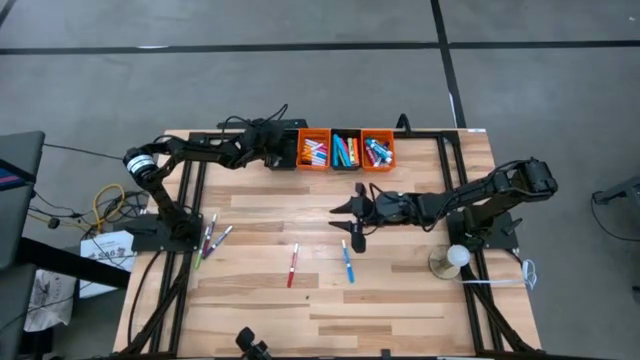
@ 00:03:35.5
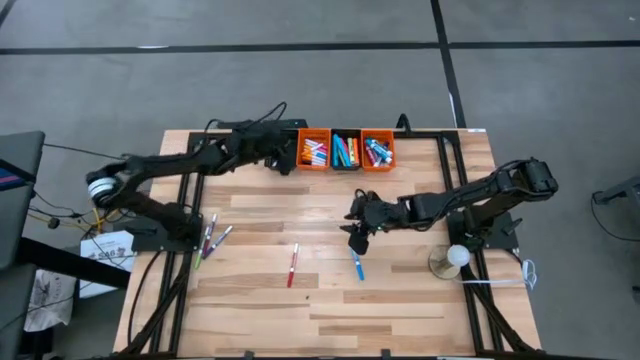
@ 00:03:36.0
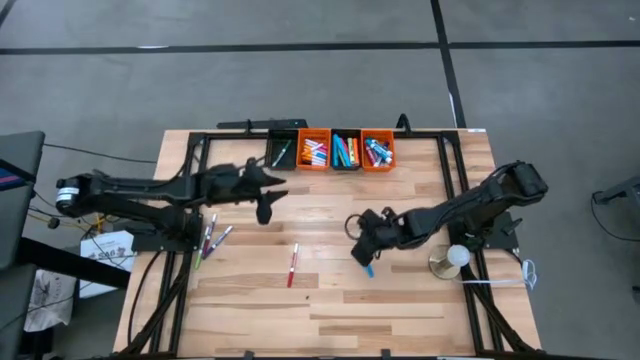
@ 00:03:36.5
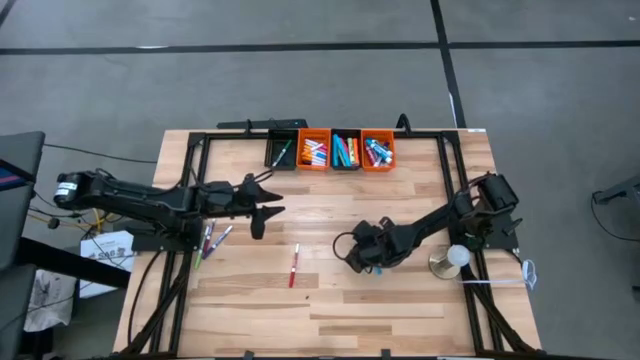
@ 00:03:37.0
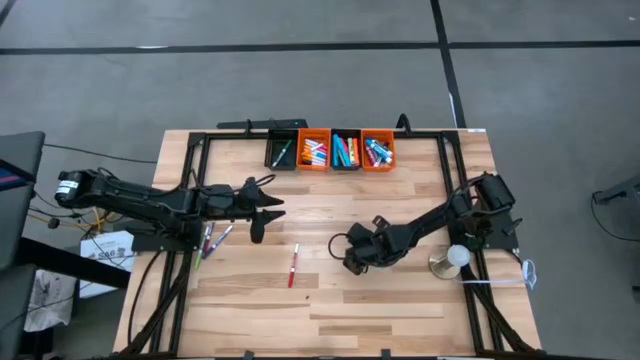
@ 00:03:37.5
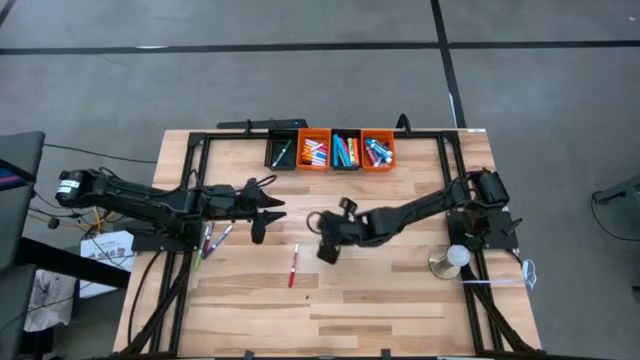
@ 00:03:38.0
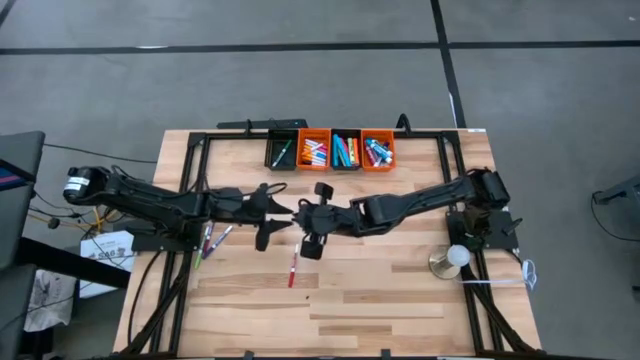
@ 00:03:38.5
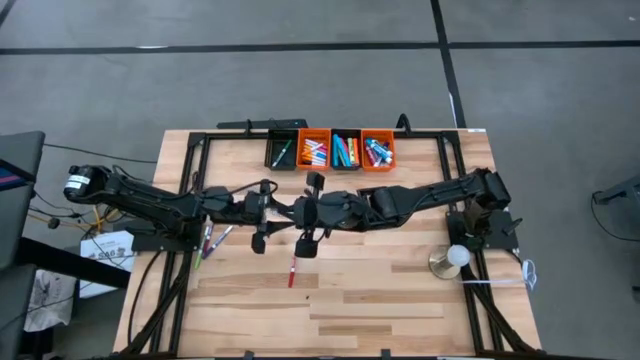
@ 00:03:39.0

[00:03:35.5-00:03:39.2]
Task: Pick & Place Markers
Put the light blue and white marker pen into the left black bin

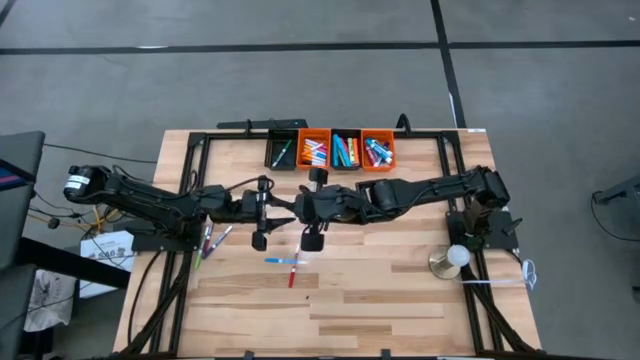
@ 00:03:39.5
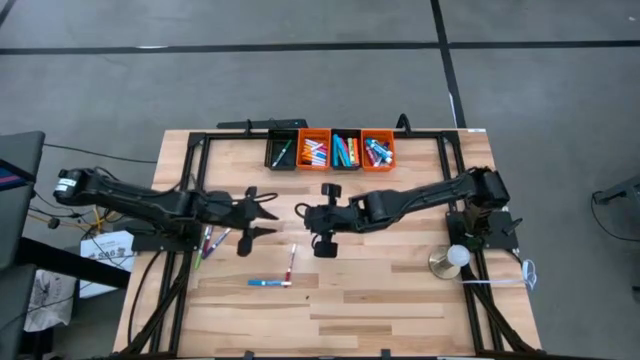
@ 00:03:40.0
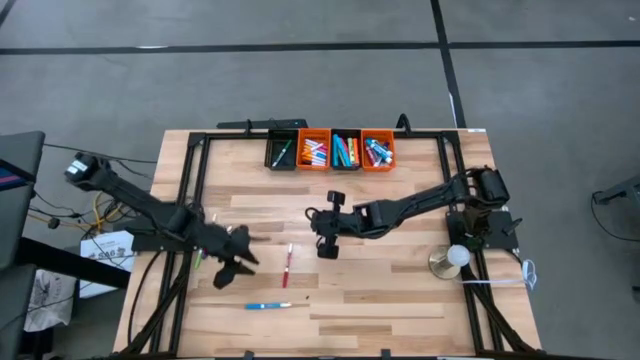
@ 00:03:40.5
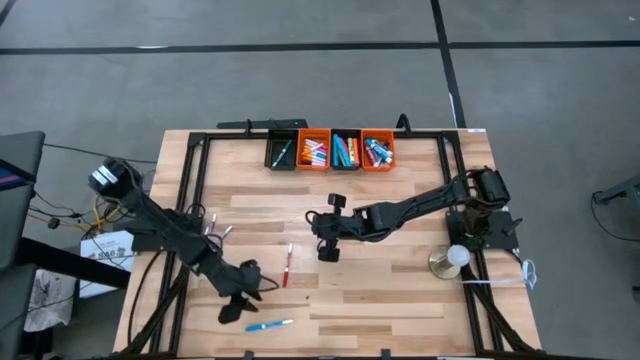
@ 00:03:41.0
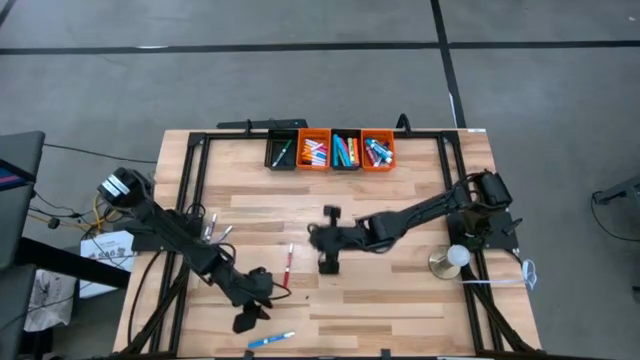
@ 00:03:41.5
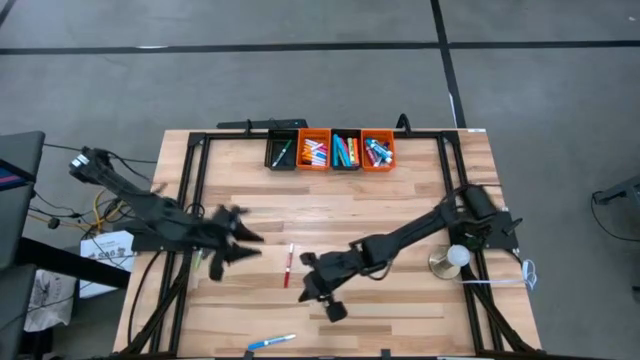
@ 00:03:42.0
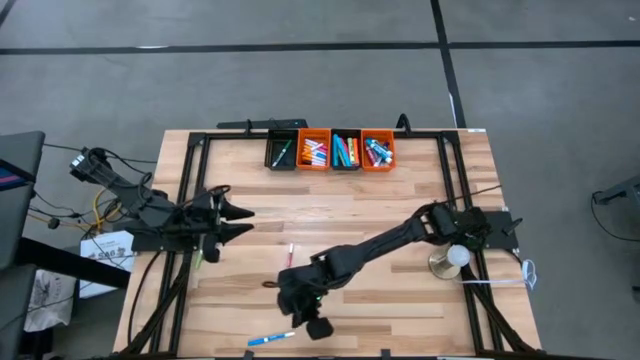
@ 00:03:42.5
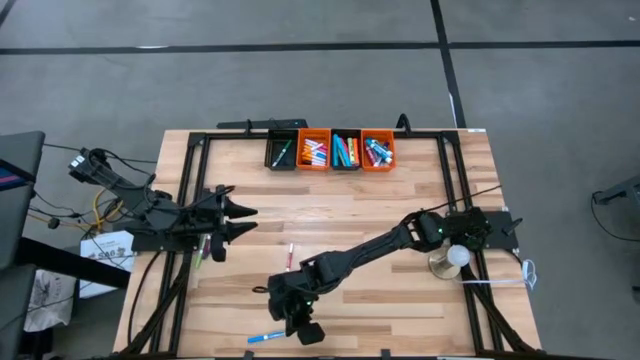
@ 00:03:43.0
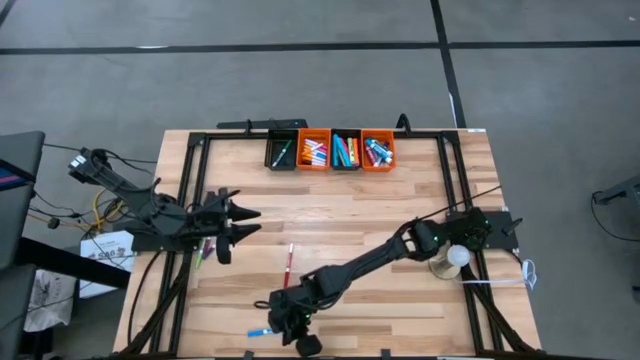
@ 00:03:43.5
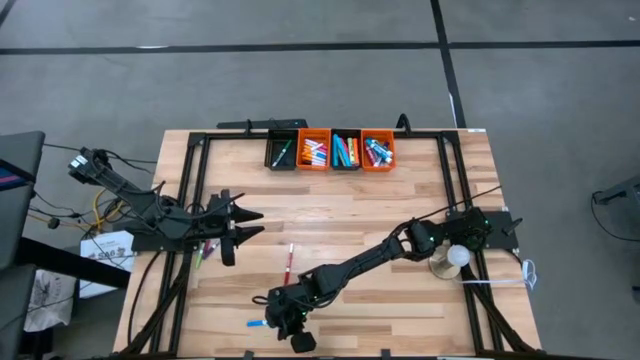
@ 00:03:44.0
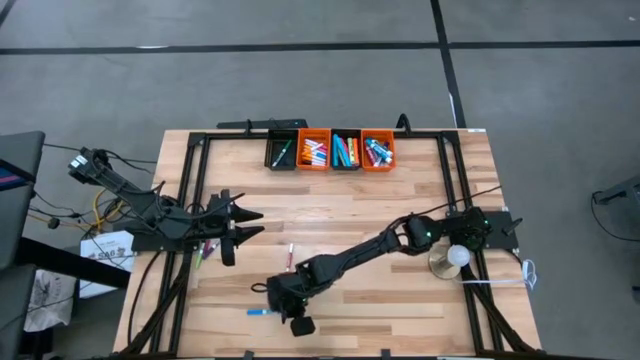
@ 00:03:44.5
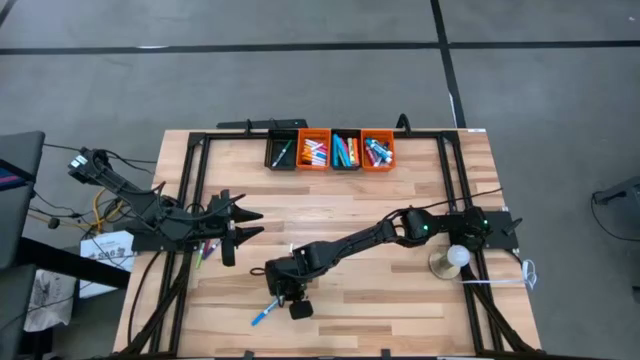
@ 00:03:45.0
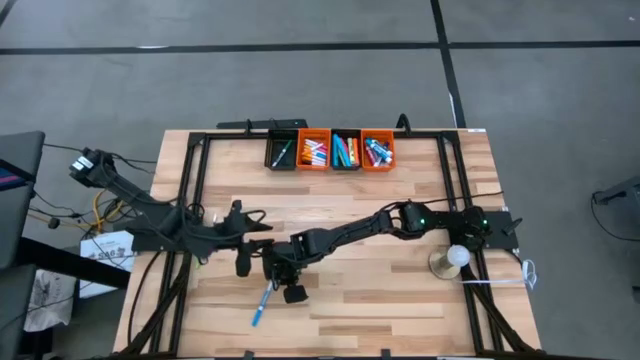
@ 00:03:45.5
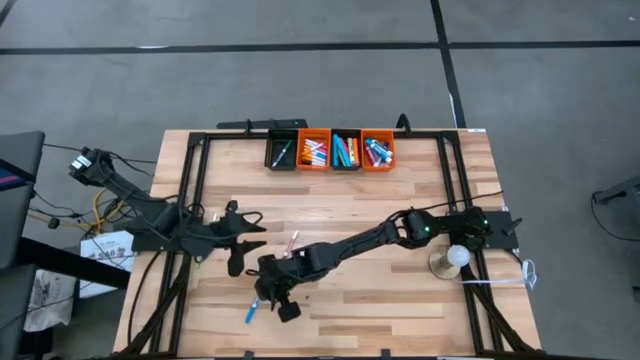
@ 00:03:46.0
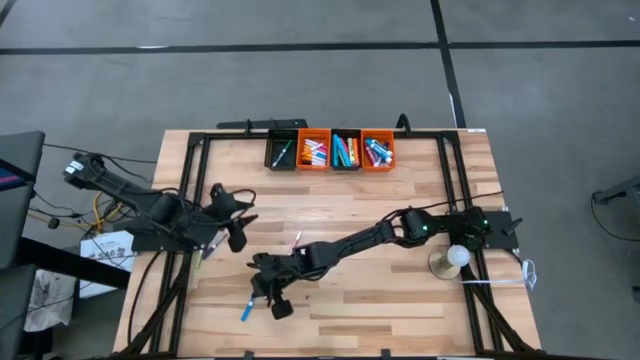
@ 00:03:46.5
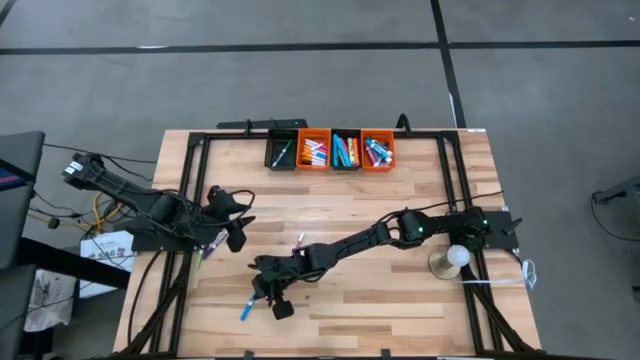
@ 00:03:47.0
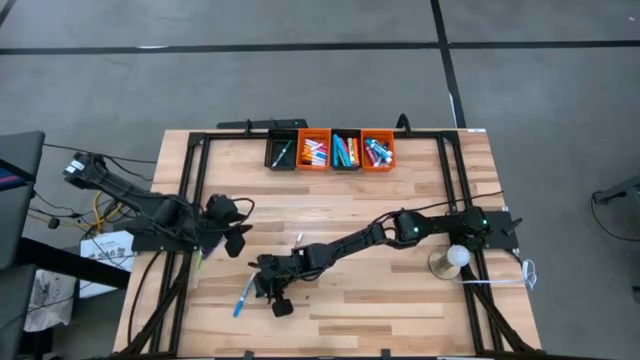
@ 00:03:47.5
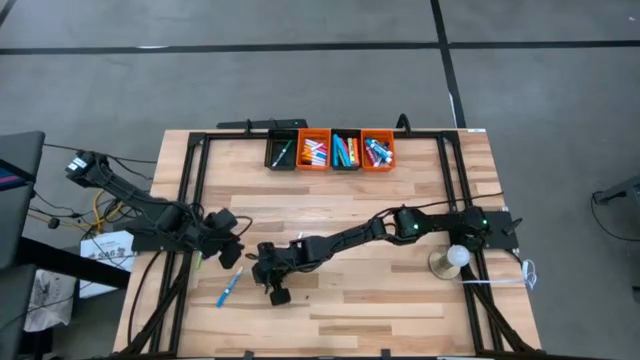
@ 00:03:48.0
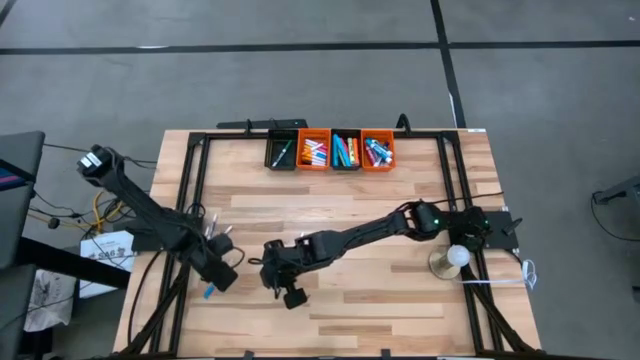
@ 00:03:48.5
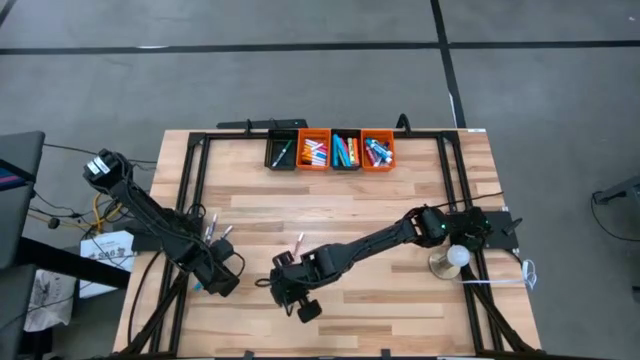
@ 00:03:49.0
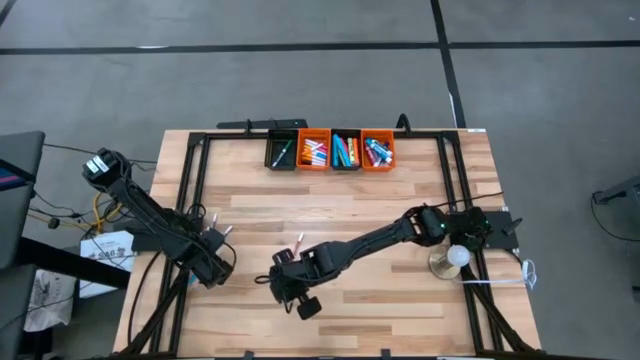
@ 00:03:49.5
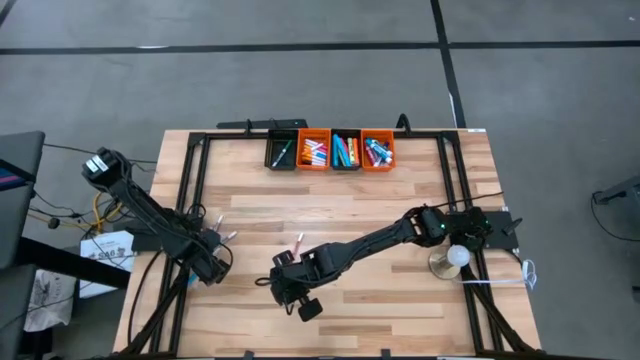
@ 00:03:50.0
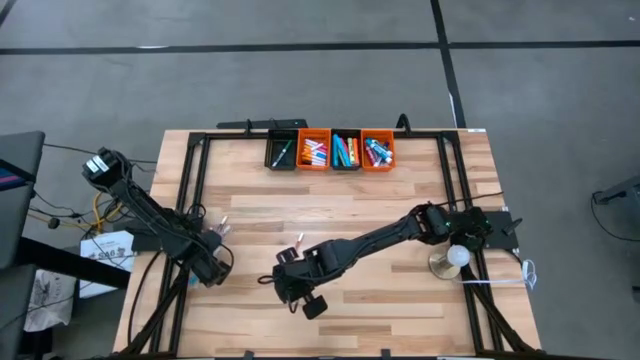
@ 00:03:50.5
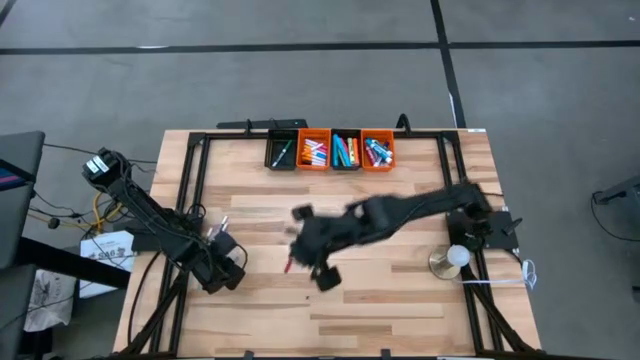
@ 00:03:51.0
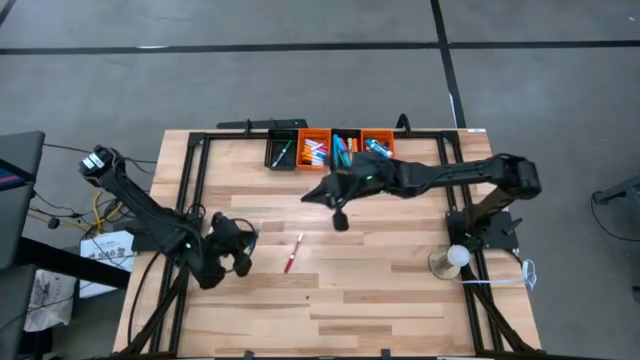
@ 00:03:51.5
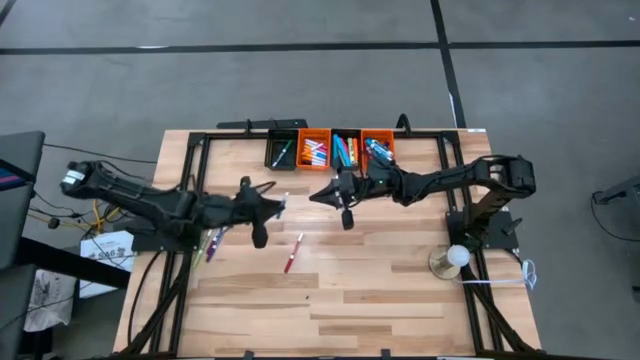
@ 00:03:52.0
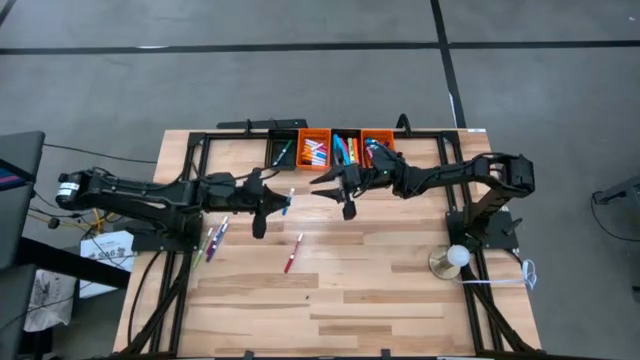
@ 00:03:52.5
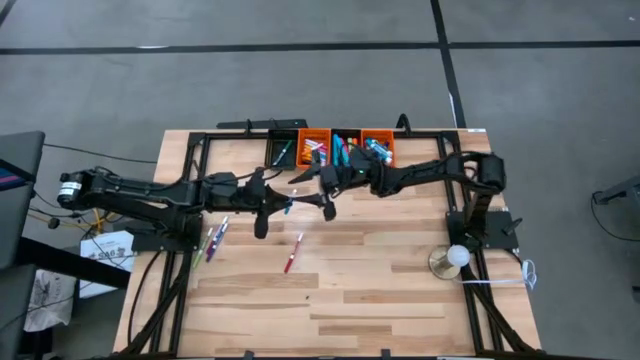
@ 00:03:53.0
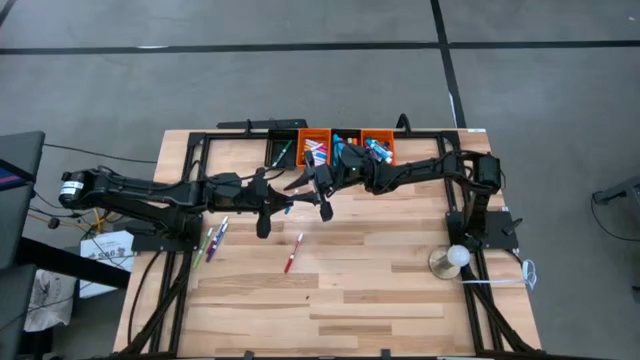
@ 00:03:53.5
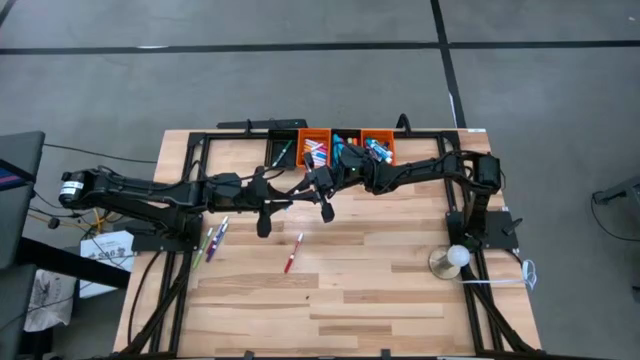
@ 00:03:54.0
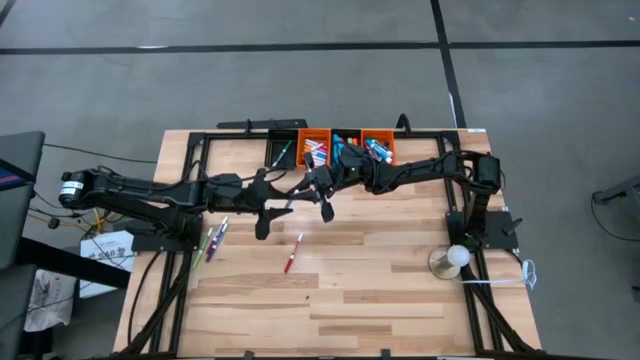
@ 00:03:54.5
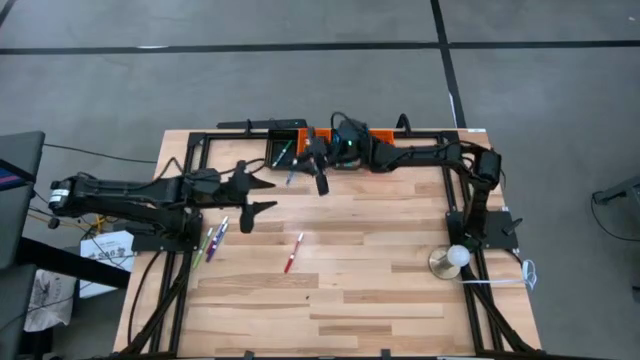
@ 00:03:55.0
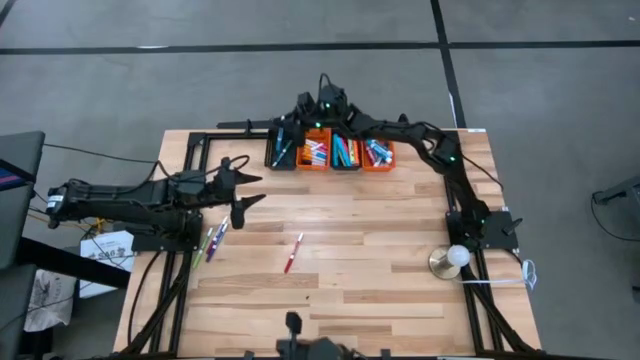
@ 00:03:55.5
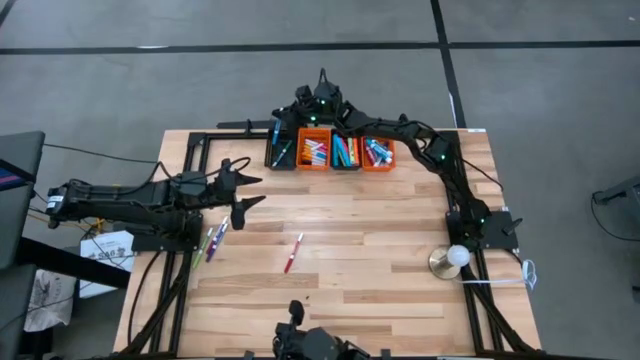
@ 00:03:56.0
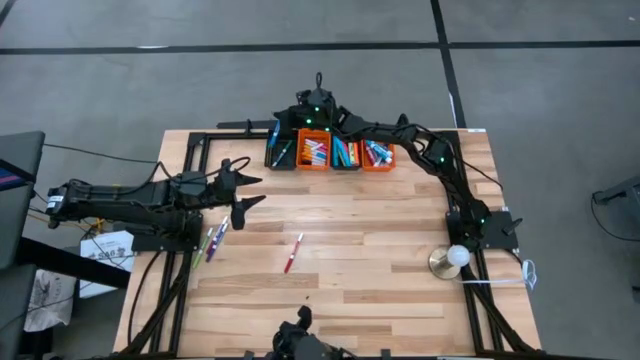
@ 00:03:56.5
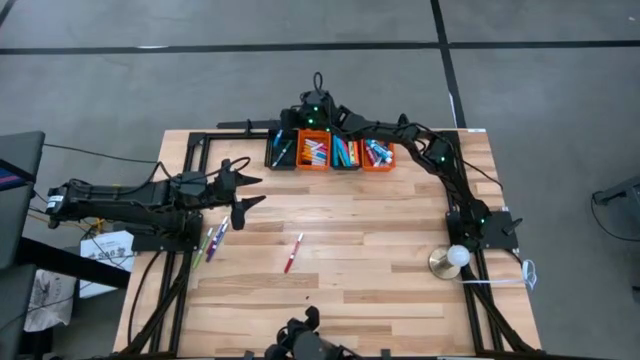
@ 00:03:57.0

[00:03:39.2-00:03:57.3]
Put the light blue and white marker pen into the left black bin
